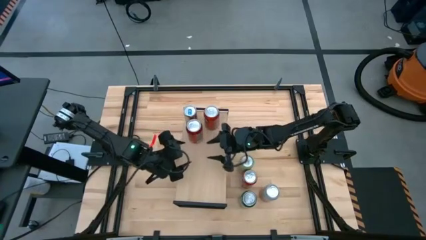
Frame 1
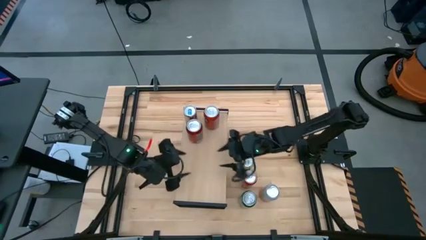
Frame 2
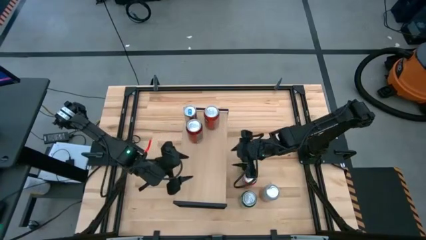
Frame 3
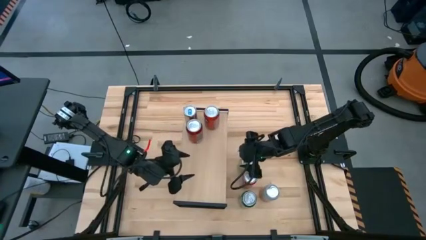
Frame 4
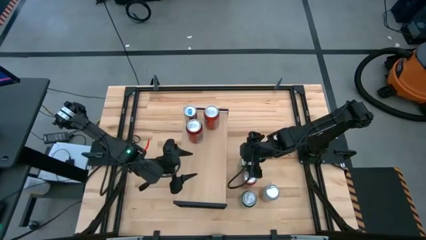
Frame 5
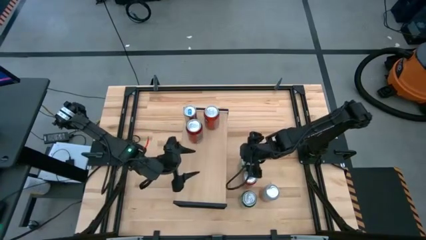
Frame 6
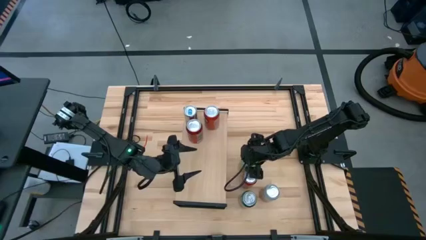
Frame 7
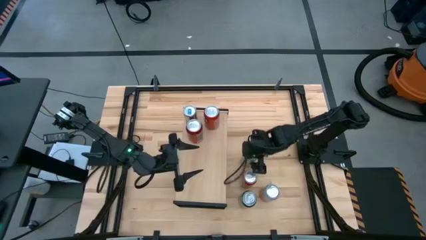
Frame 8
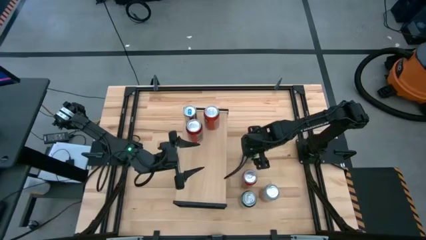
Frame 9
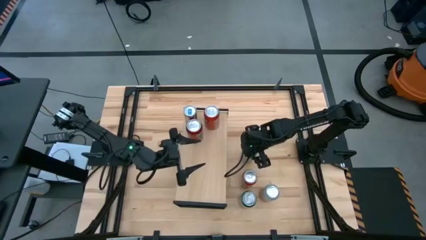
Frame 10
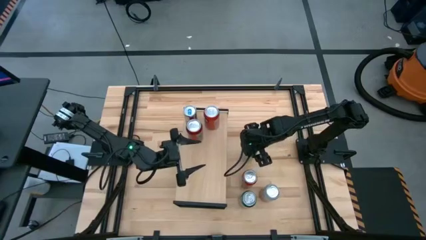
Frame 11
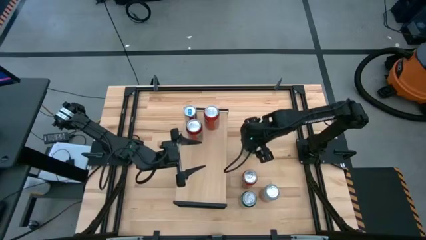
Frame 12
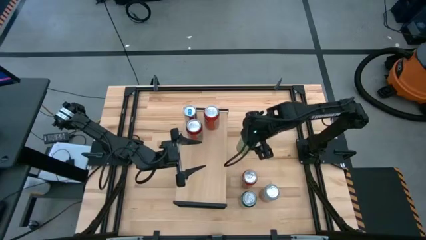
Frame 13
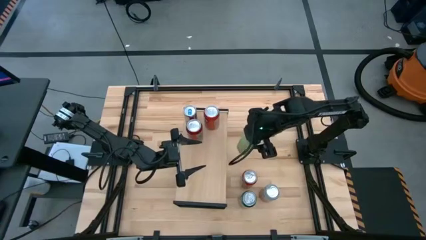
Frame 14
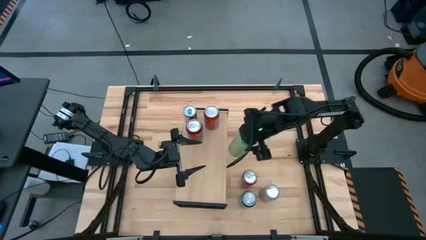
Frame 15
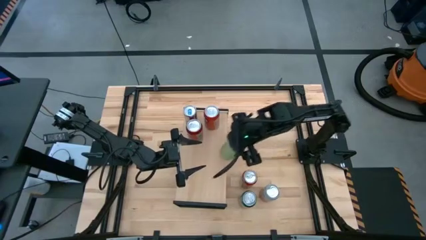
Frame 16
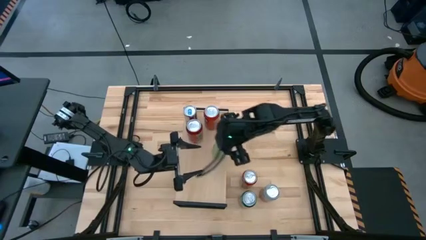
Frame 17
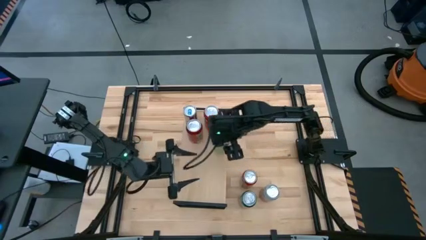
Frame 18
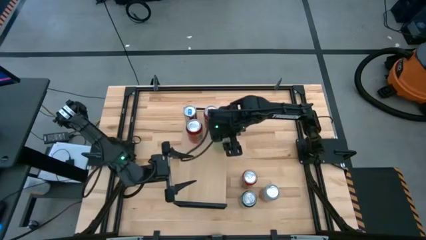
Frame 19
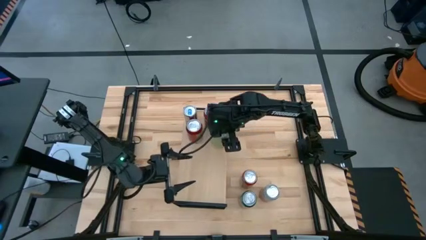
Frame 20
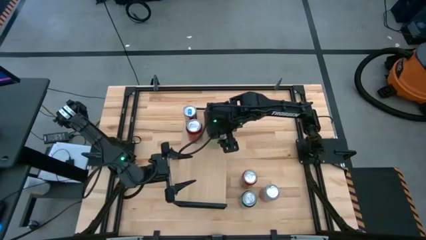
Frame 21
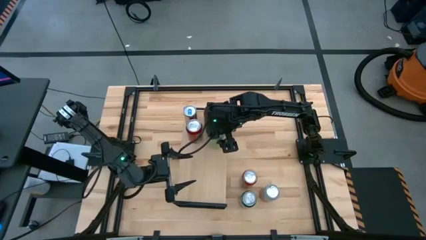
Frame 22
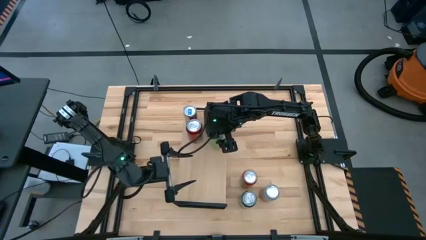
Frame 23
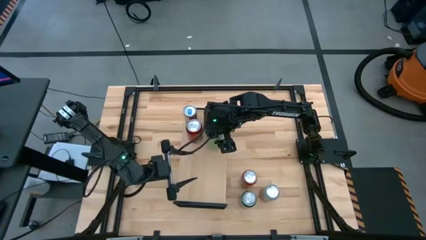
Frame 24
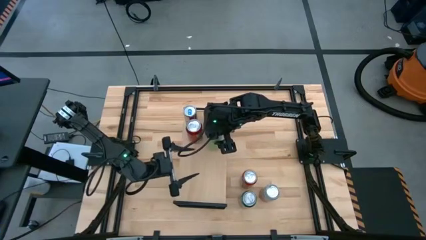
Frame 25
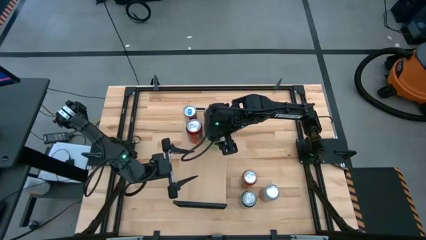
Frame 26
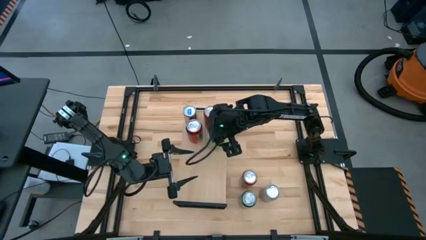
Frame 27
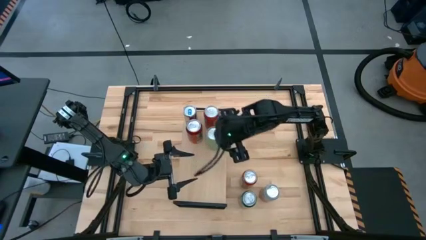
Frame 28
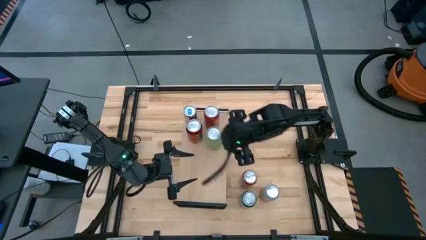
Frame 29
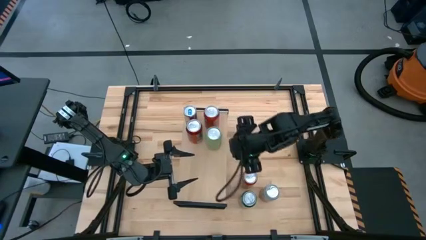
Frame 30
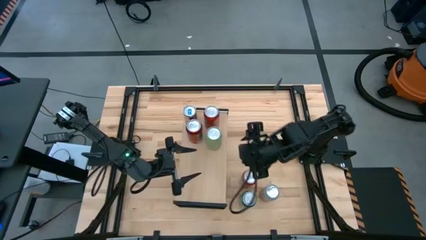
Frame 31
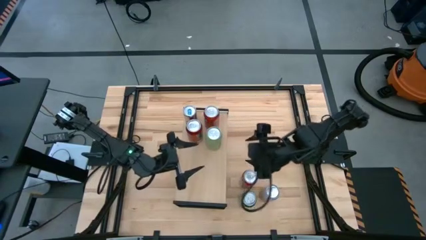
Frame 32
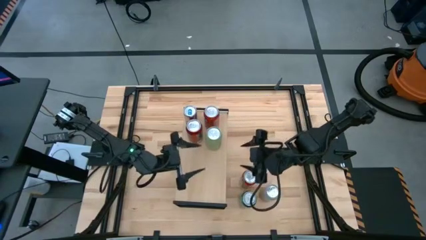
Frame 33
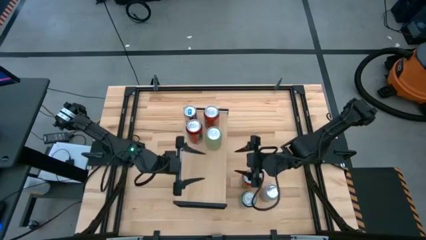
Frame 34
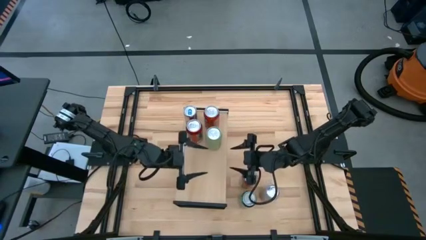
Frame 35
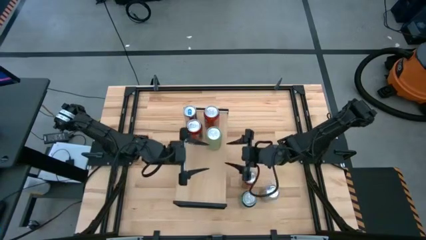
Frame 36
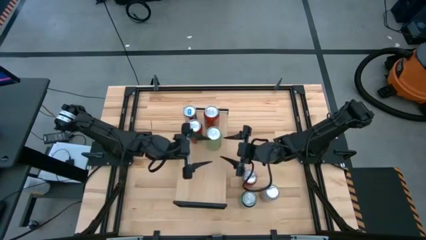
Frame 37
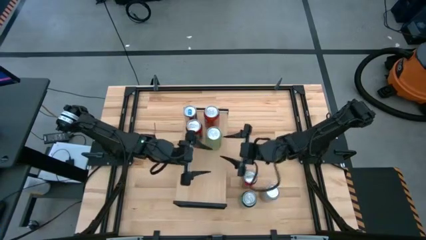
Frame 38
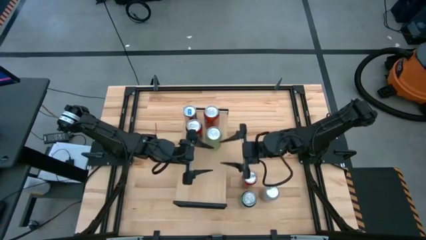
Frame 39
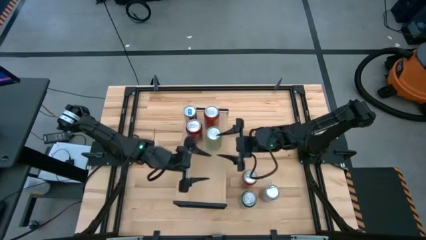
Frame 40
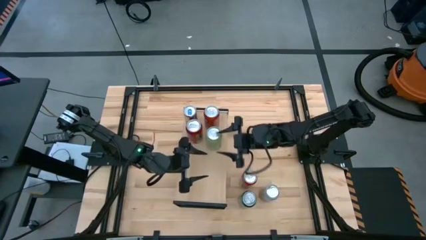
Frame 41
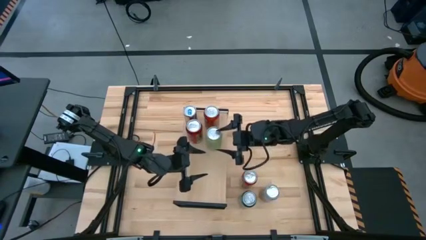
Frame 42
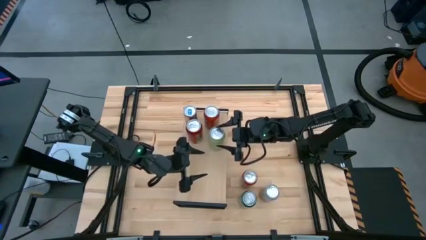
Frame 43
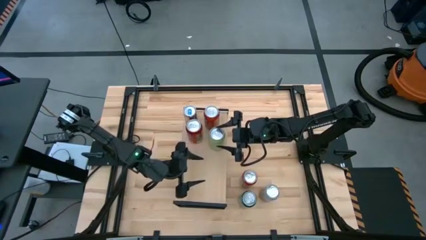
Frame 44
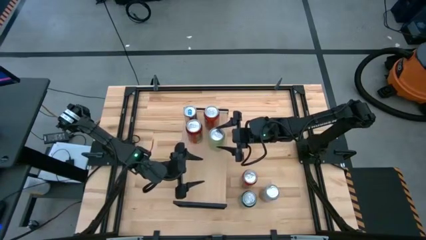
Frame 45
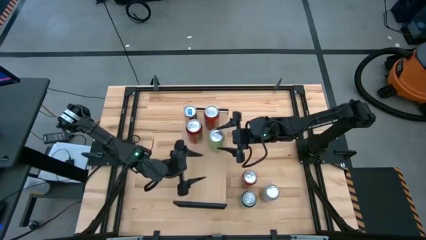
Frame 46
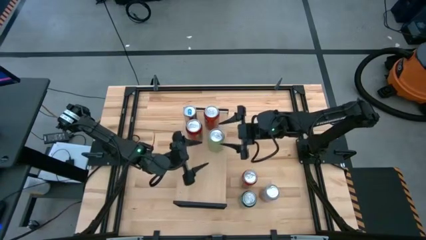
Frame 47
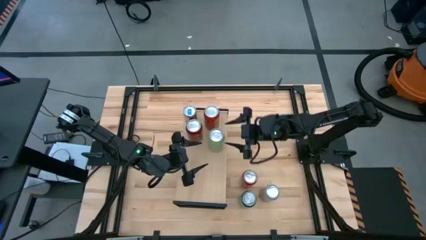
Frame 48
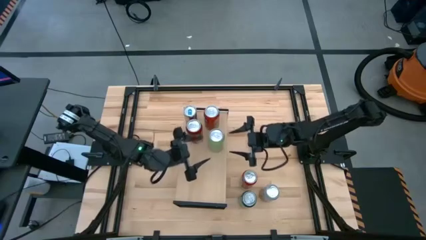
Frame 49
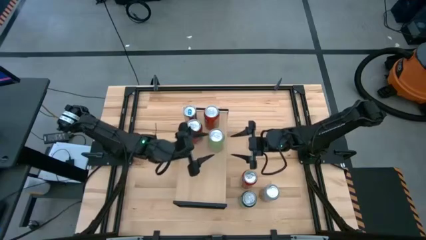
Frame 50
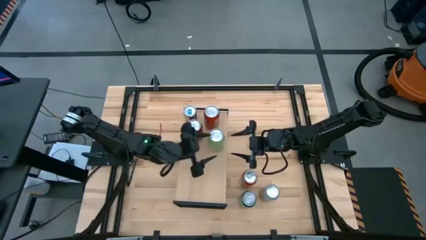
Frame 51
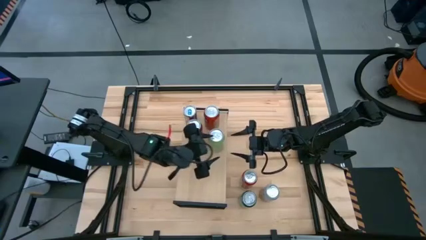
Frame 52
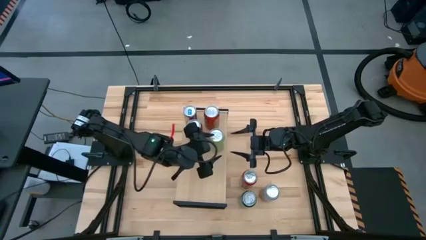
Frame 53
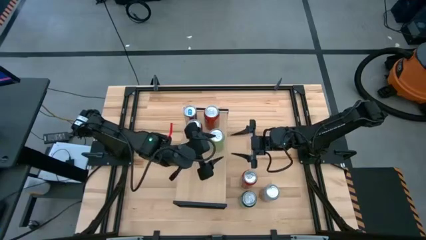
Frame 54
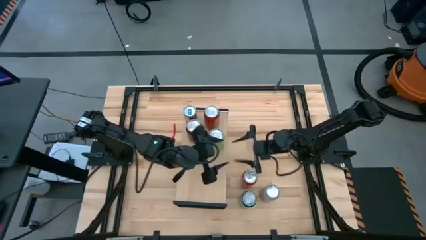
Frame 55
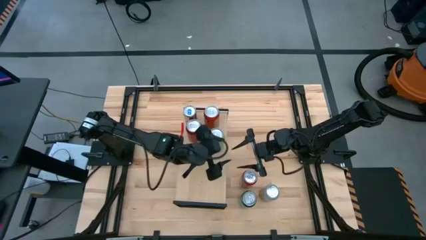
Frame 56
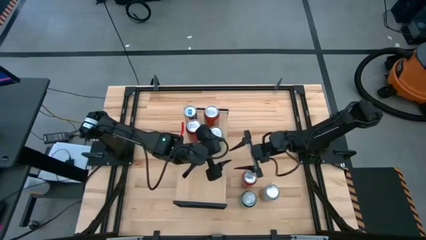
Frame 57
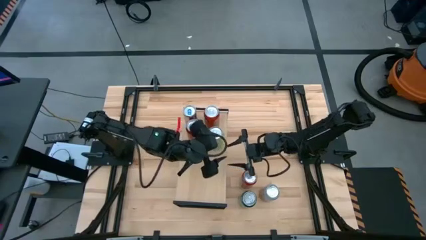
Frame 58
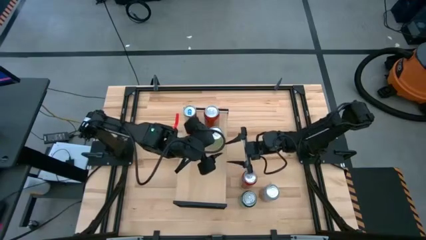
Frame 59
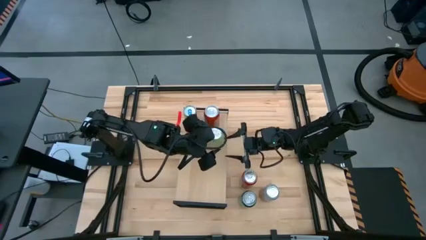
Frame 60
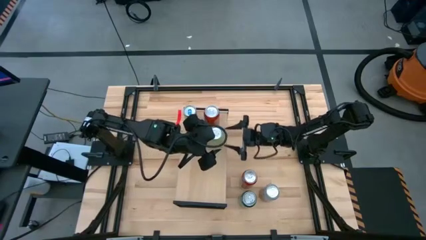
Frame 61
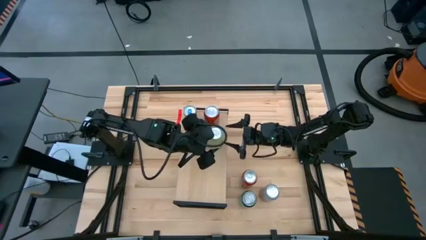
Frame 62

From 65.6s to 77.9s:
Task: Place canned beverage on shelf
Put the light green soda can on the shelf
